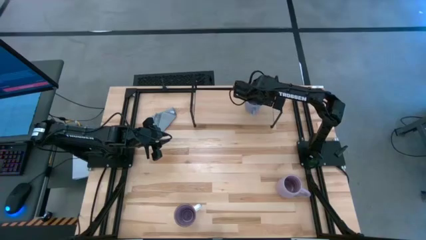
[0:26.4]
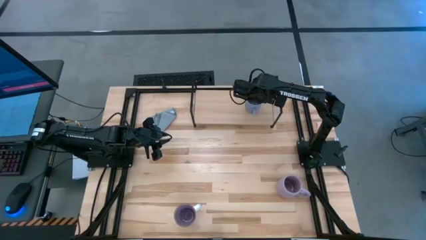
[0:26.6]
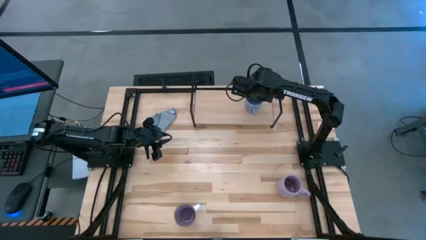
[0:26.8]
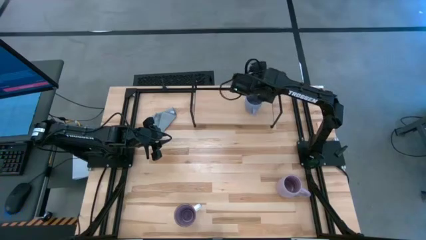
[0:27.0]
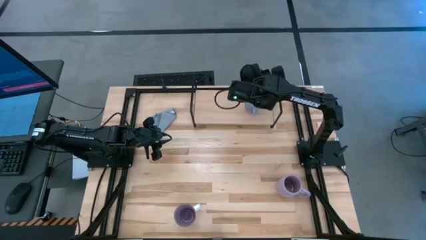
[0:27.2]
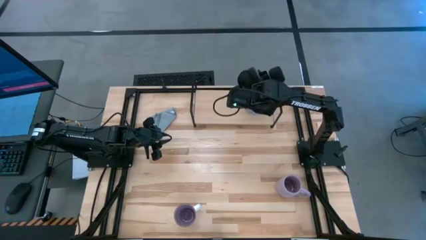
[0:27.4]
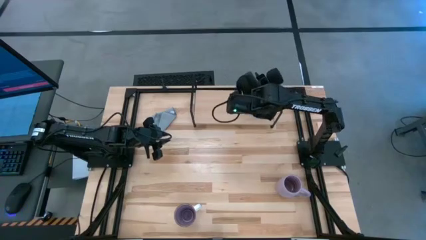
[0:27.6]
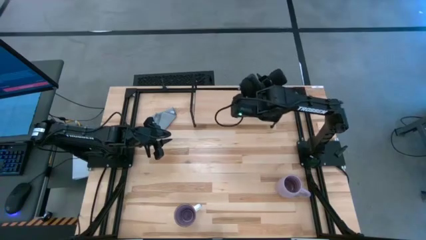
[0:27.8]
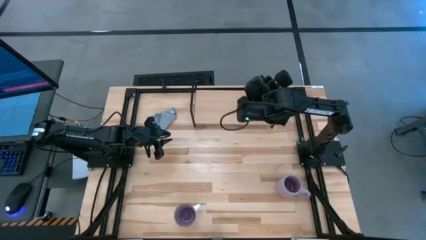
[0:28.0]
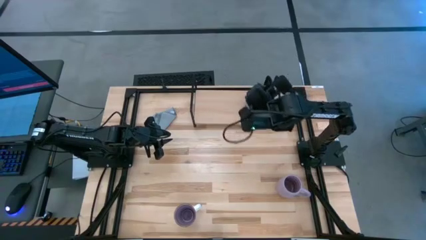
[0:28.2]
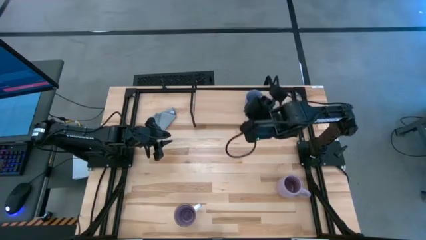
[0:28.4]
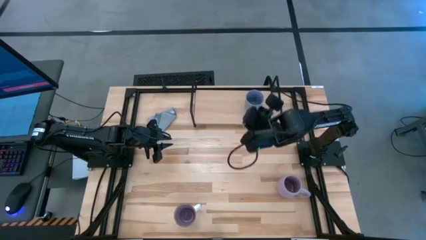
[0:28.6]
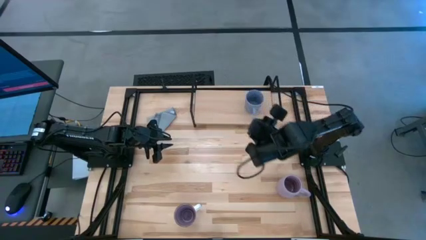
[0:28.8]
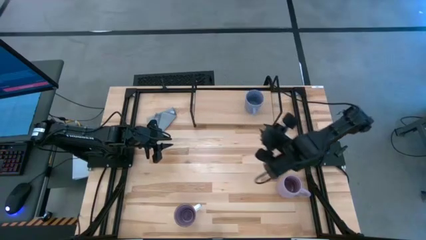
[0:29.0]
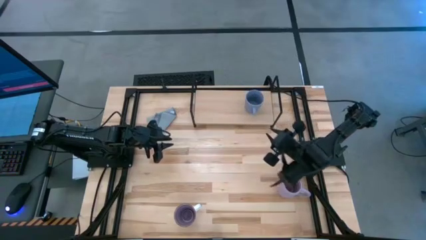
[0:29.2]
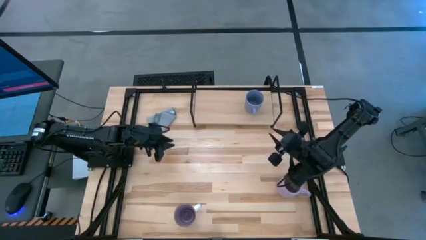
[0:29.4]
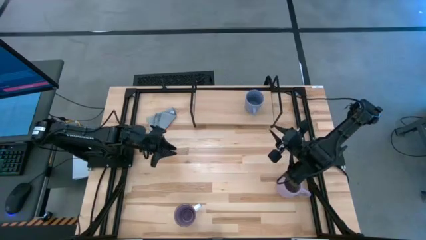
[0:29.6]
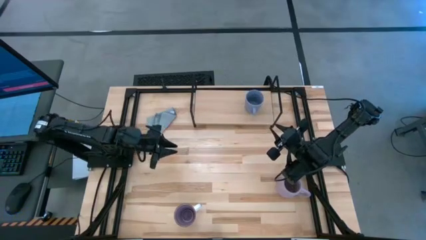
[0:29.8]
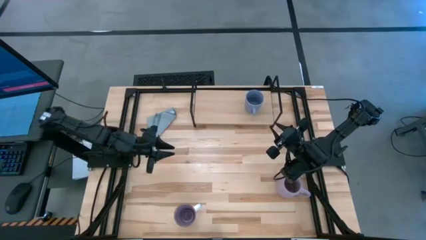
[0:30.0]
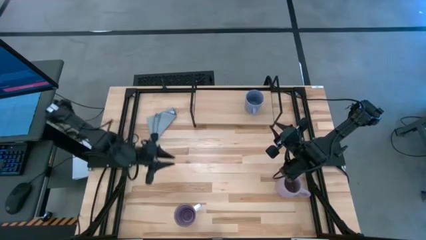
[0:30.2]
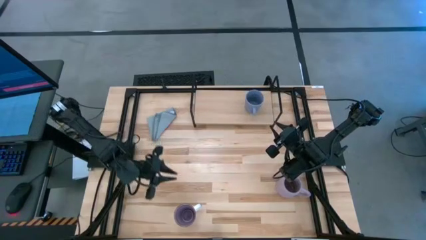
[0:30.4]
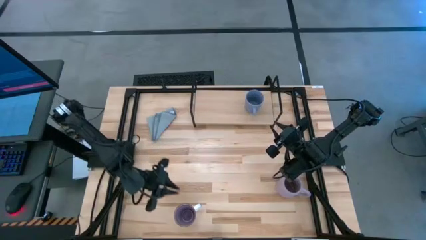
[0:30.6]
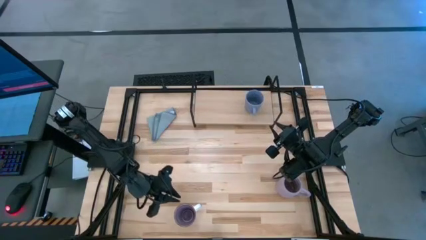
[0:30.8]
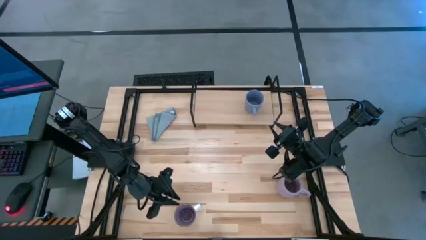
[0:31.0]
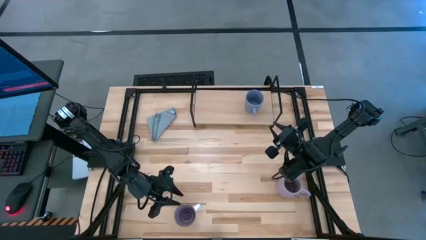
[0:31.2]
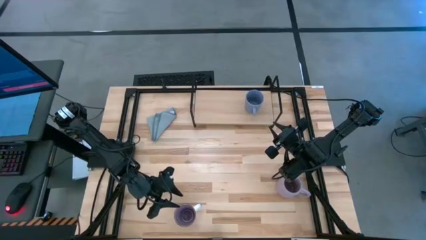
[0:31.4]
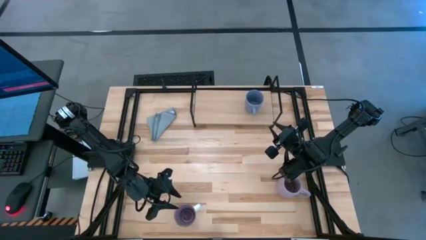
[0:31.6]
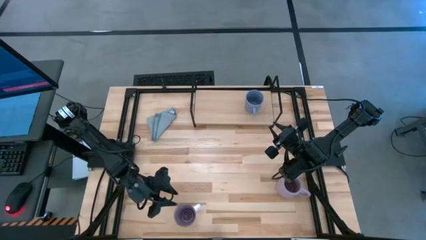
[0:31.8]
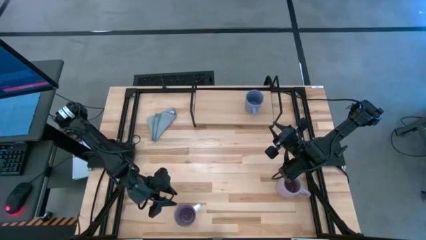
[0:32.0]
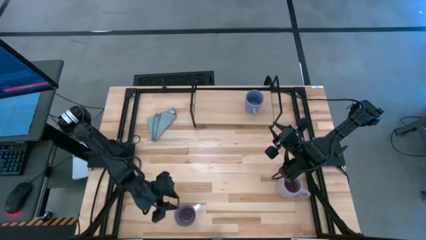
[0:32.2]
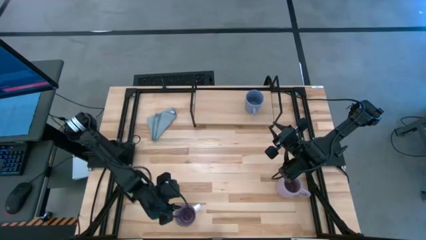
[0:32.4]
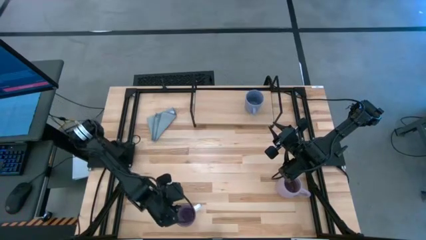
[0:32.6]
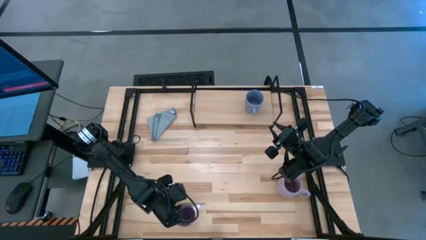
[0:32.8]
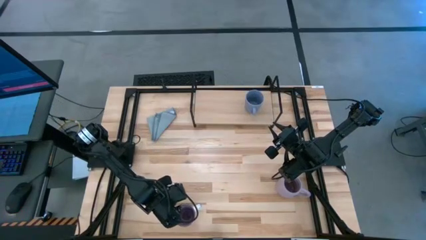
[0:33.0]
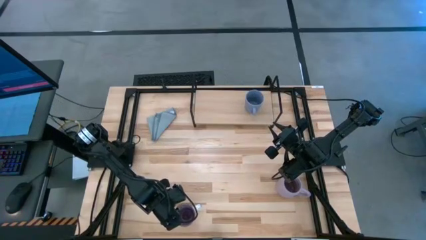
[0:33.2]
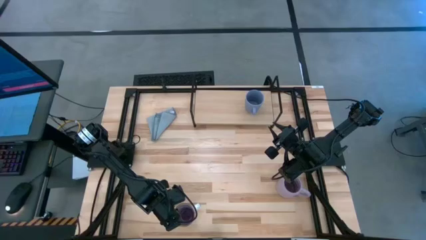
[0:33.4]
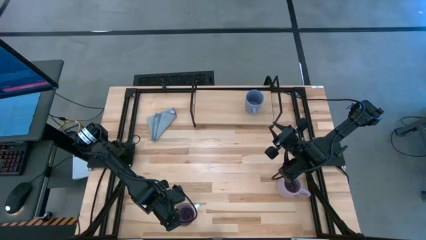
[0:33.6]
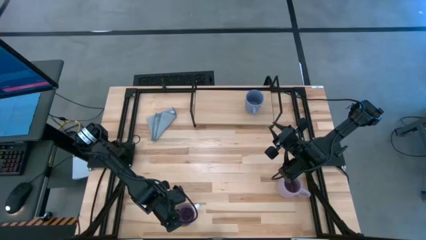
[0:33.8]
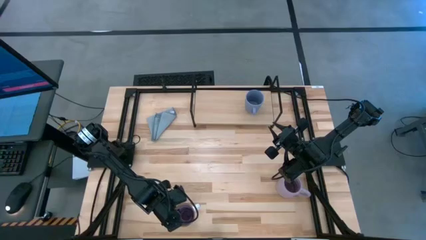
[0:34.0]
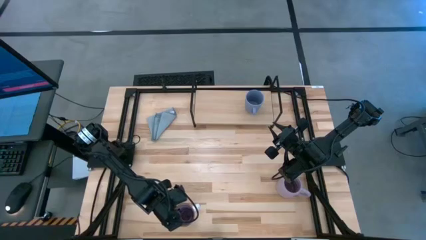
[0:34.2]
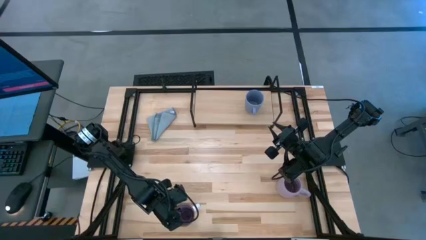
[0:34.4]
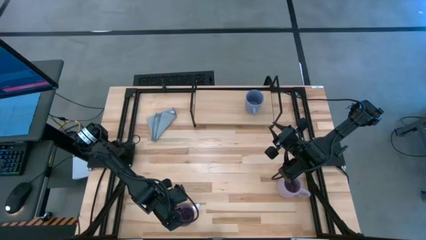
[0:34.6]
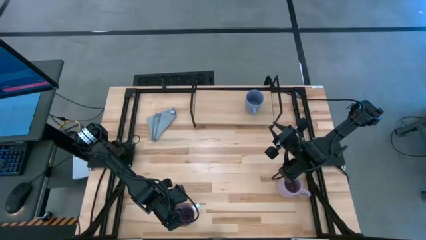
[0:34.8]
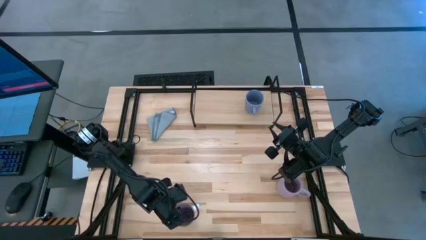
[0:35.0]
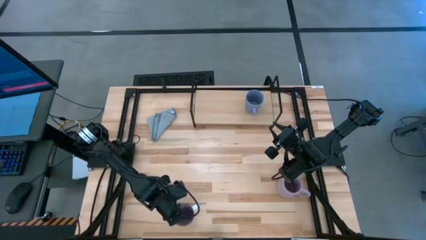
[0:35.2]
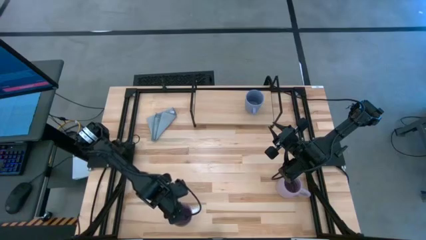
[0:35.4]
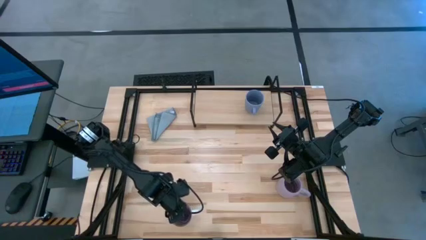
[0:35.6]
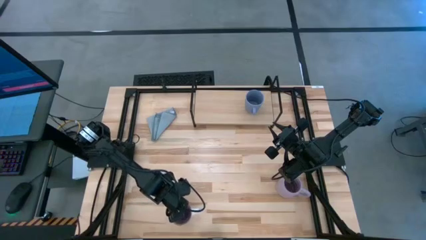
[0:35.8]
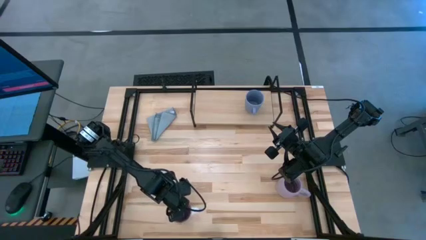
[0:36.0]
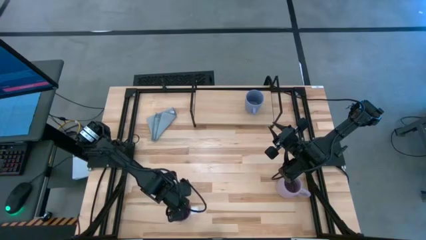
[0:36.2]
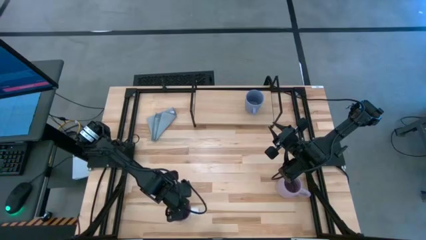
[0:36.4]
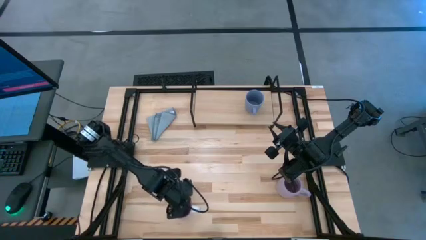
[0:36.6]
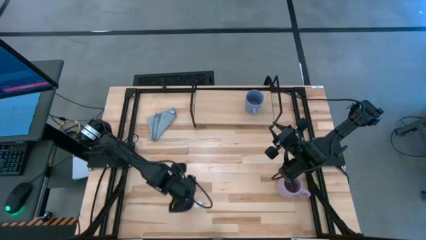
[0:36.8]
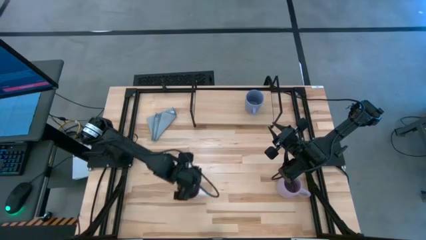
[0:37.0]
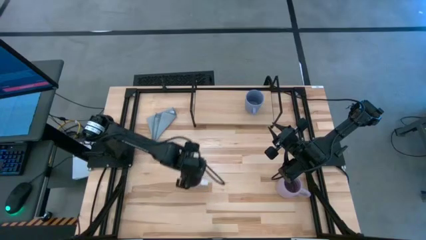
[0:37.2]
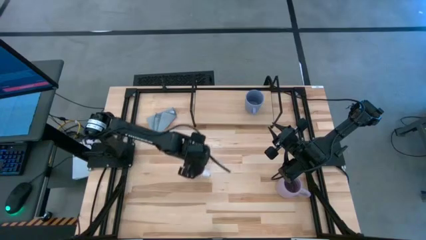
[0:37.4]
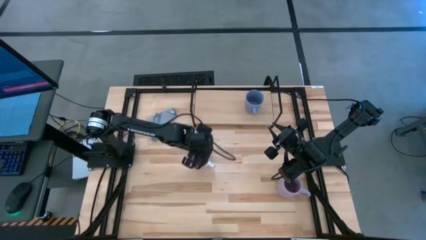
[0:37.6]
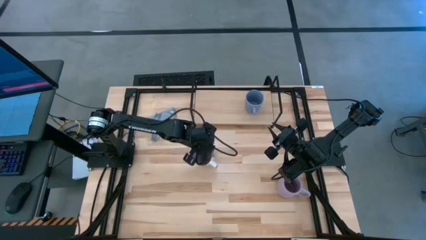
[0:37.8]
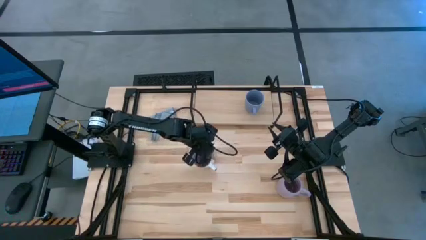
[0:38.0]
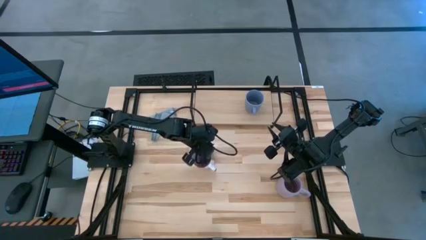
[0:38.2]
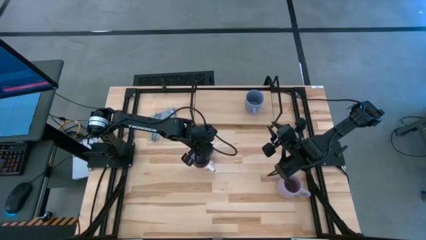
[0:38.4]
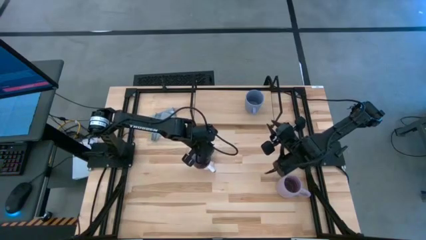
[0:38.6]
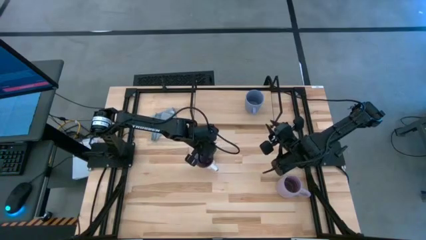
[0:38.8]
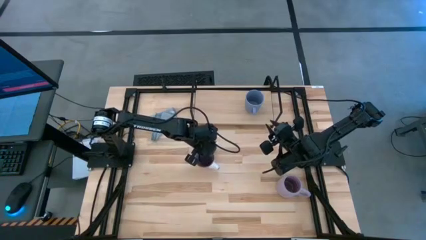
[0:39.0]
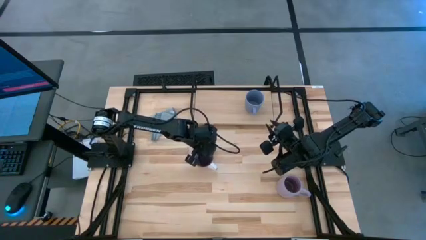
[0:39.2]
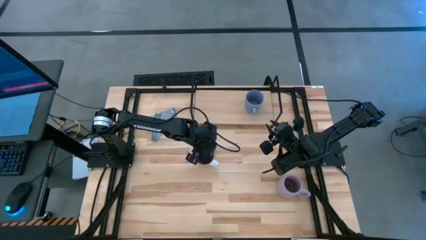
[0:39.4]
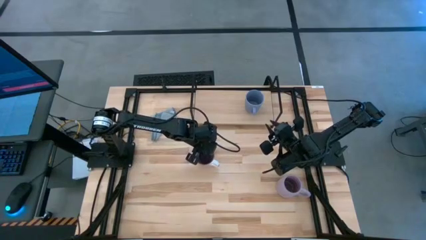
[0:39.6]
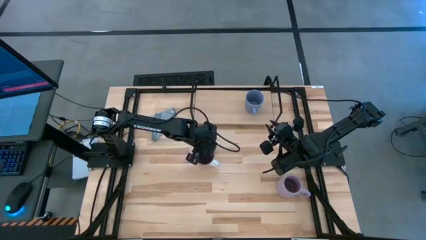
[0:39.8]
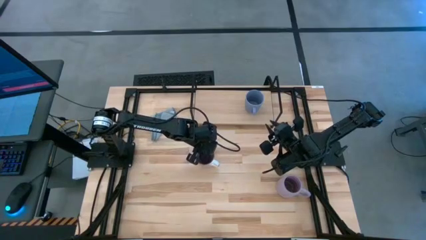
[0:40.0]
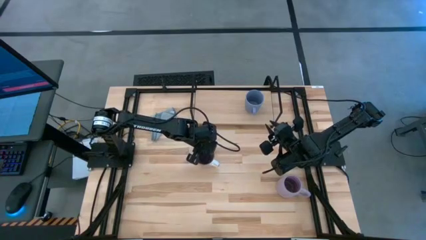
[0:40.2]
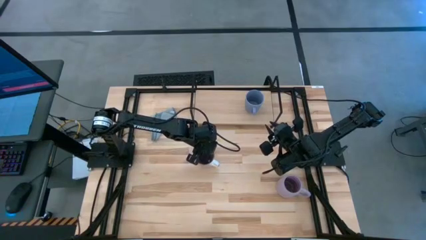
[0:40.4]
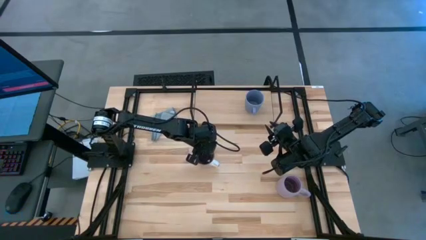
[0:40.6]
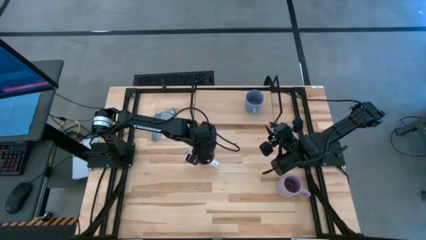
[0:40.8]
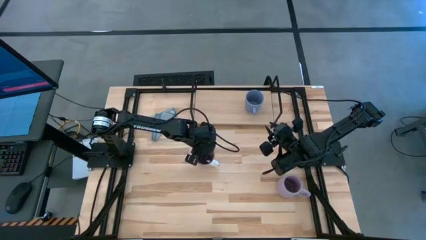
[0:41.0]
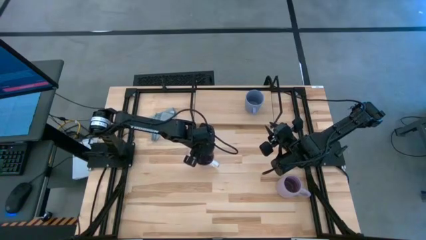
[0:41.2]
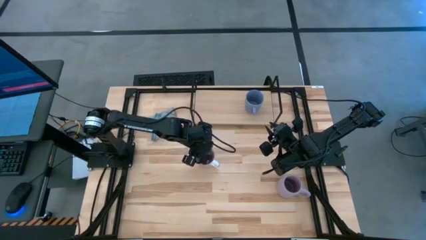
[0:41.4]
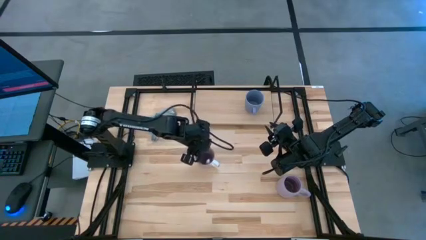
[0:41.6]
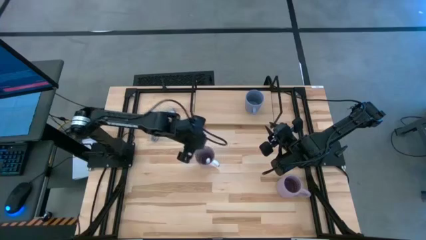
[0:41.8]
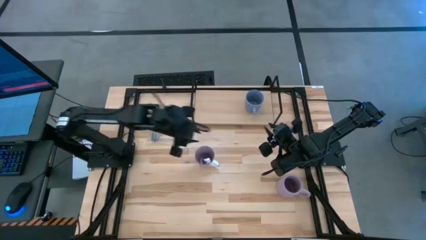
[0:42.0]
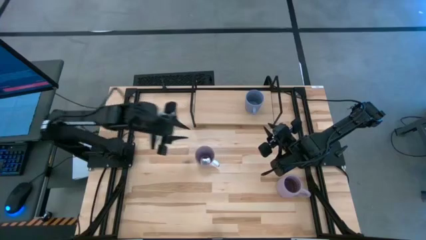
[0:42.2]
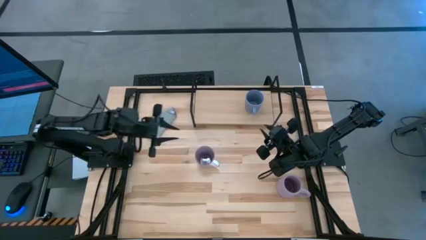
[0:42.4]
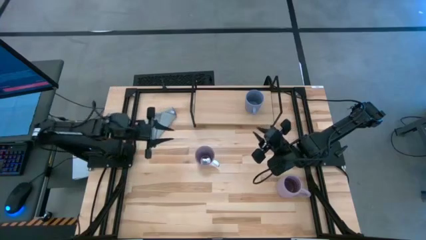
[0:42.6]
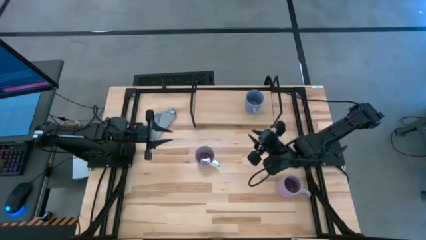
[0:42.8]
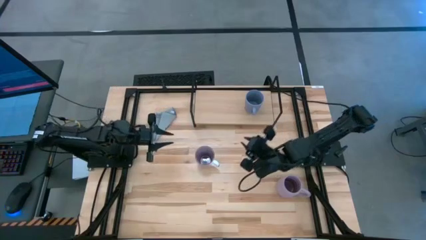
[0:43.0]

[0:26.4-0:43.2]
Task: Stack small to large cups/mugs on shelf
Put the left purple cup on the shelf

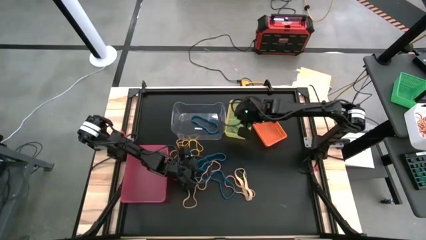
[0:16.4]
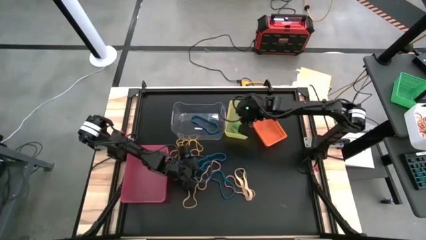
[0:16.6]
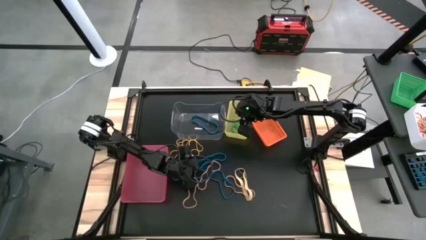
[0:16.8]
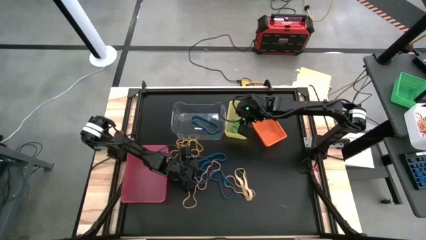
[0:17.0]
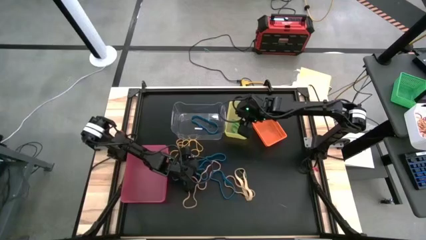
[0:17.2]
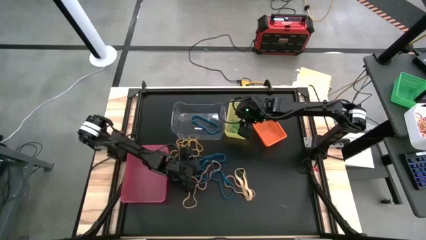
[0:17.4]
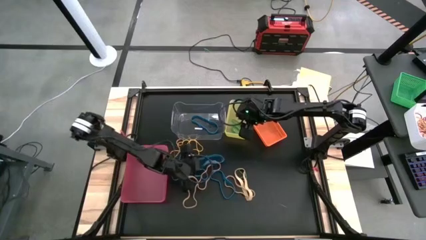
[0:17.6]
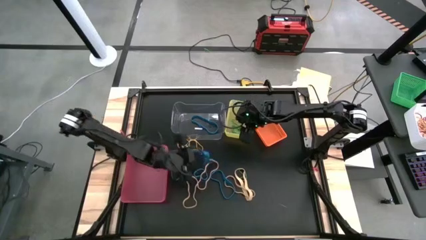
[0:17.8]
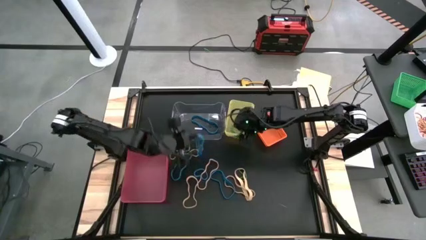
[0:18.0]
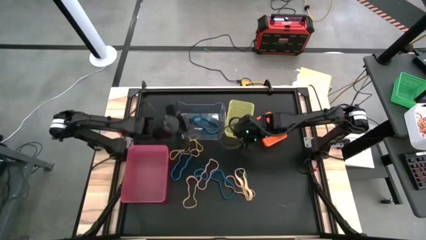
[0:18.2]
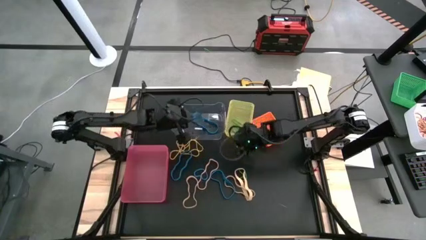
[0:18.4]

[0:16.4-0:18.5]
Task: Sort rubber bands into baskets
Put the blue rubber band into the transparent bin
